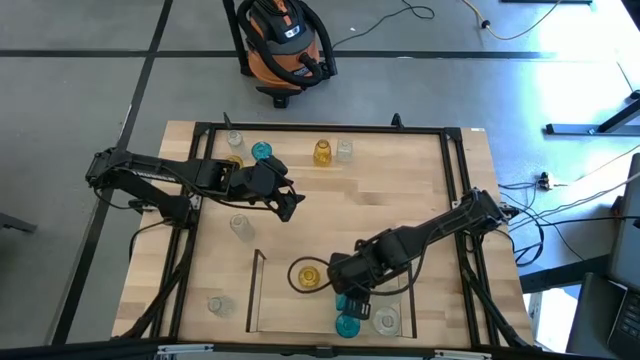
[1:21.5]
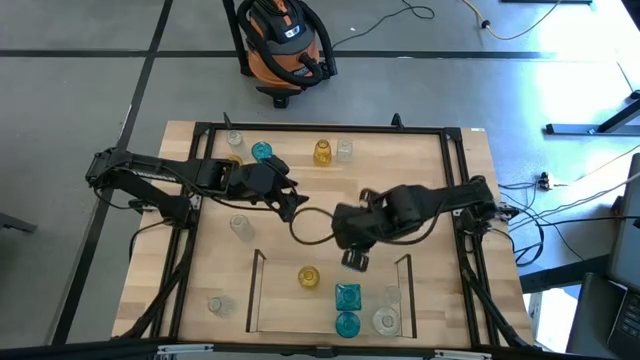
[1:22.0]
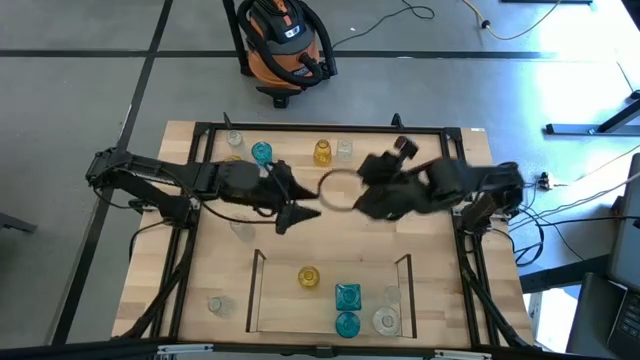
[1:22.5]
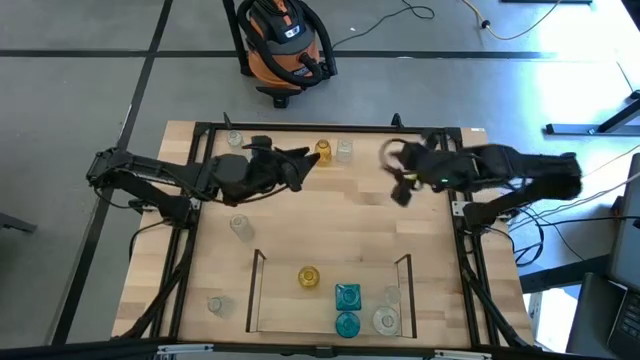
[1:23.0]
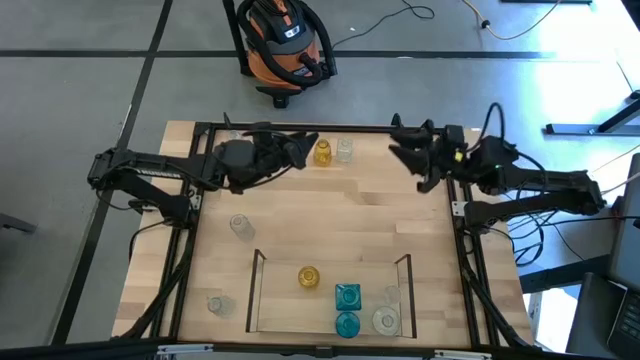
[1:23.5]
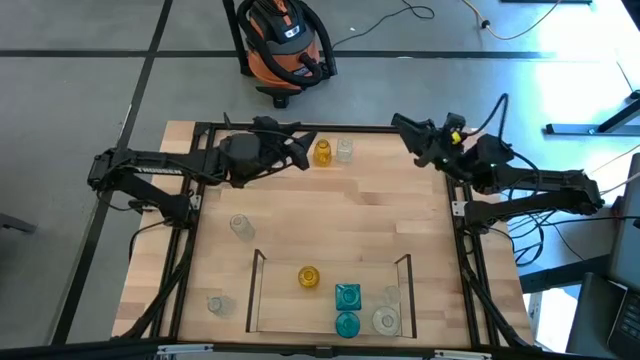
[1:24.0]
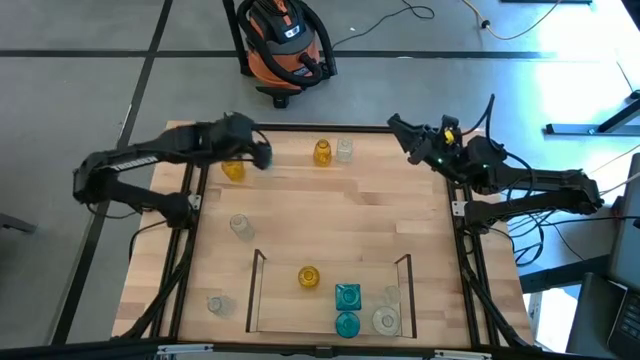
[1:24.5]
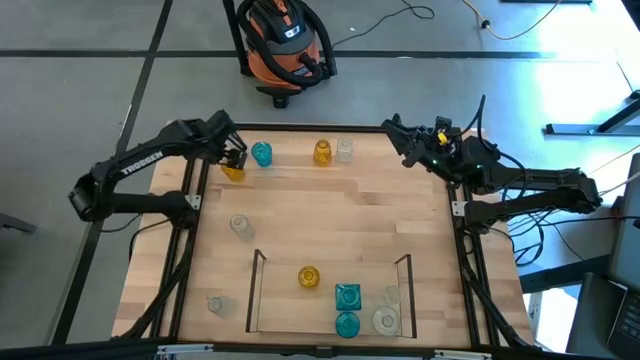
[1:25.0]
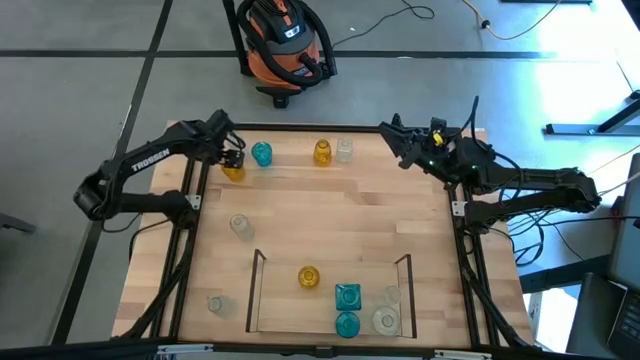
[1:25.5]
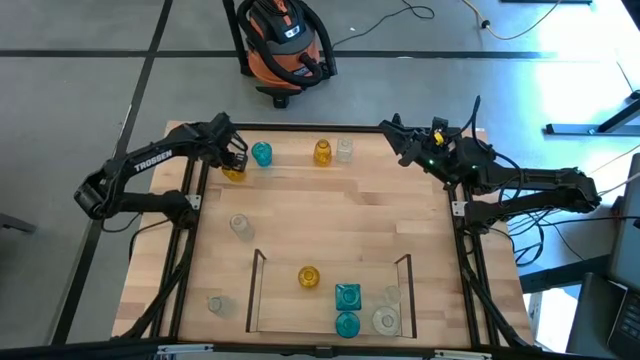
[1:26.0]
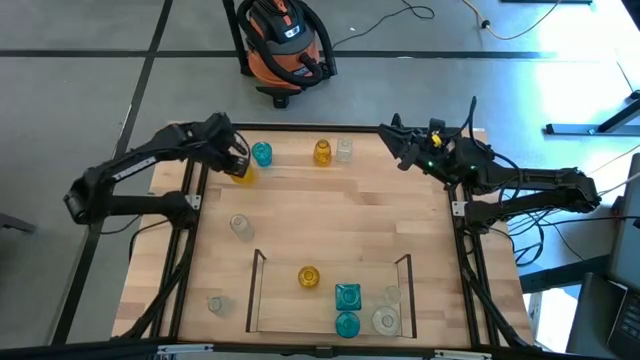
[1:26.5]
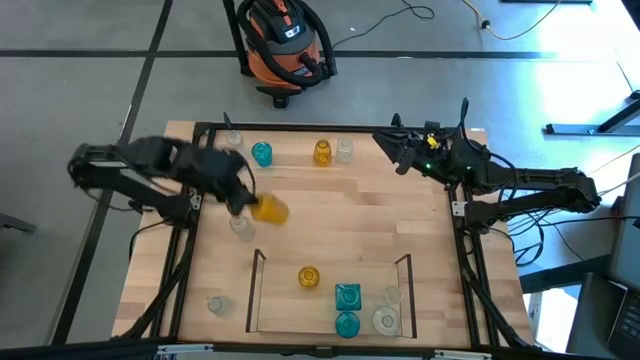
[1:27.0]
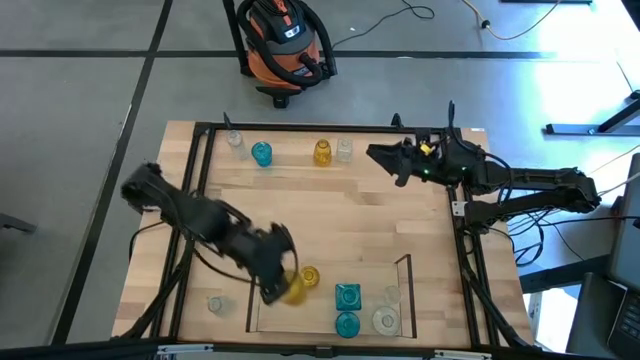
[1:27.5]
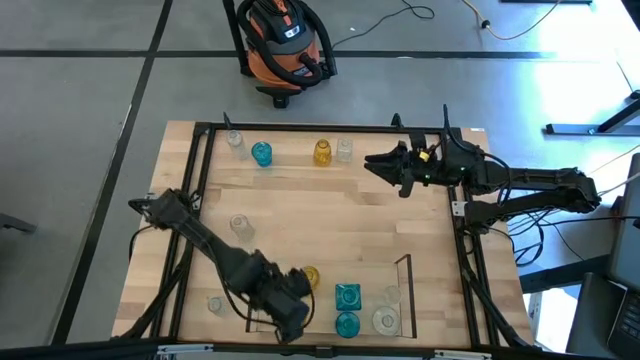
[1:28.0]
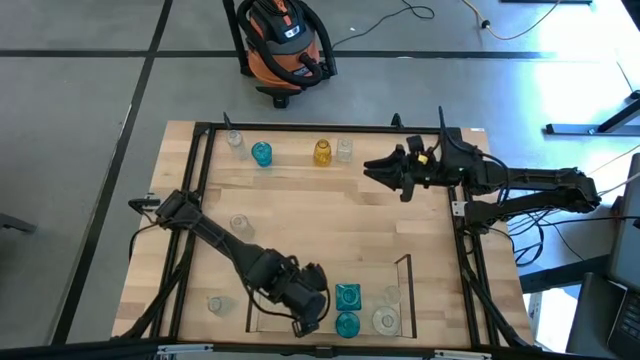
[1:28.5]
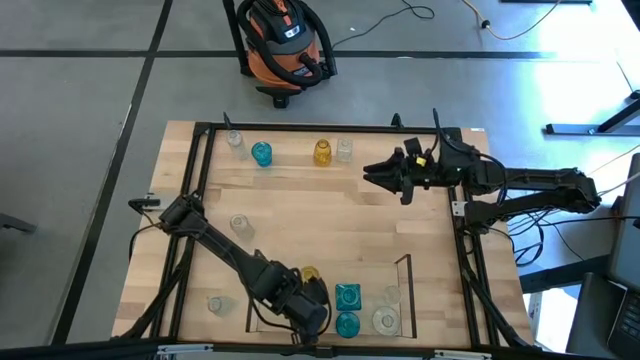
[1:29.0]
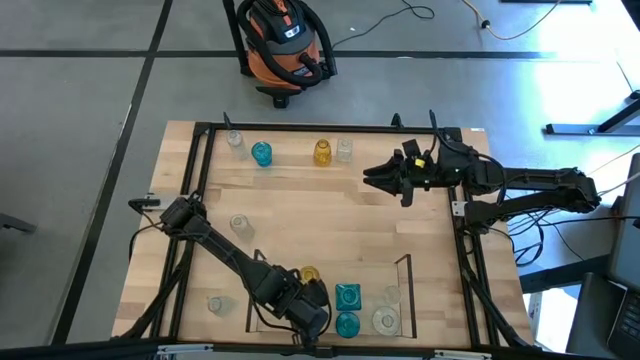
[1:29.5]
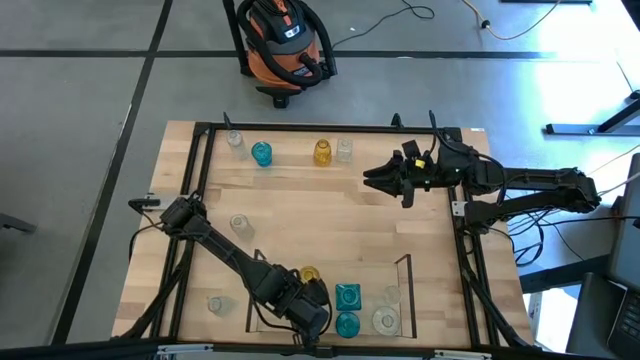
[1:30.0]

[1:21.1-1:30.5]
Task: sort vases onto shelf
Put the yellow vase on the shelf aligned with the other yellow vase

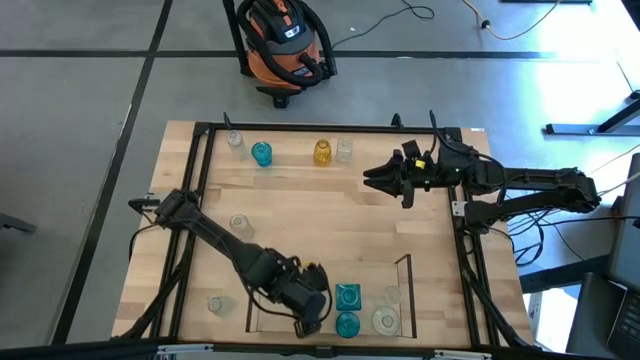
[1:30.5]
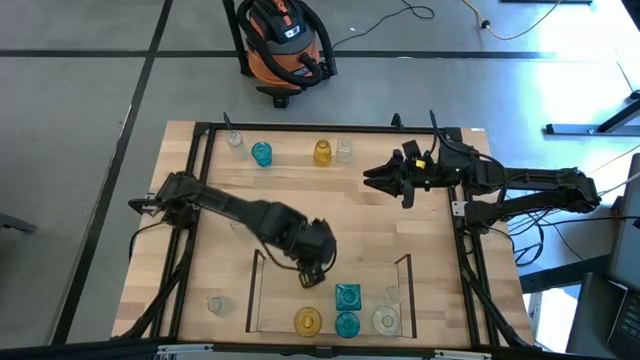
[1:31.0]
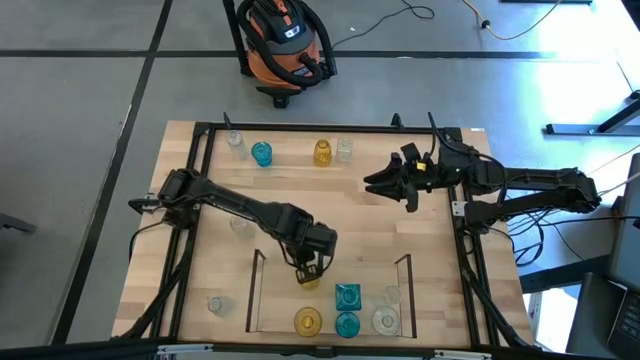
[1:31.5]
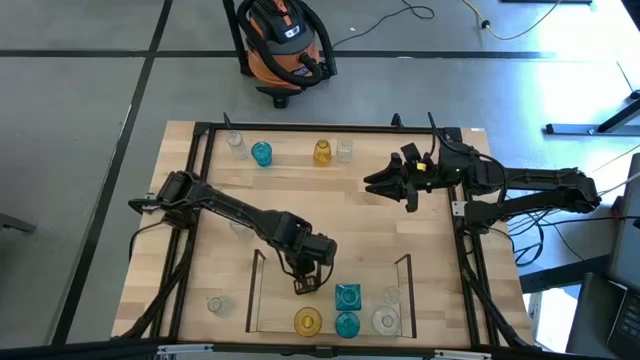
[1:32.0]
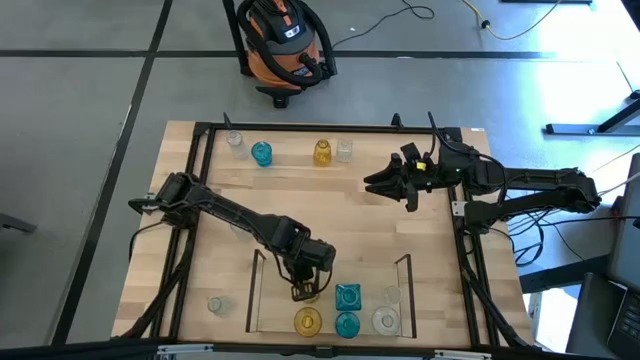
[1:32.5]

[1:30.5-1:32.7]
Adjust the yellow vase on the shelf aligned with the other yellow vase

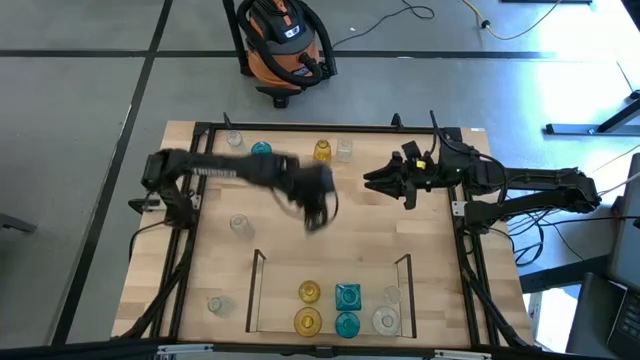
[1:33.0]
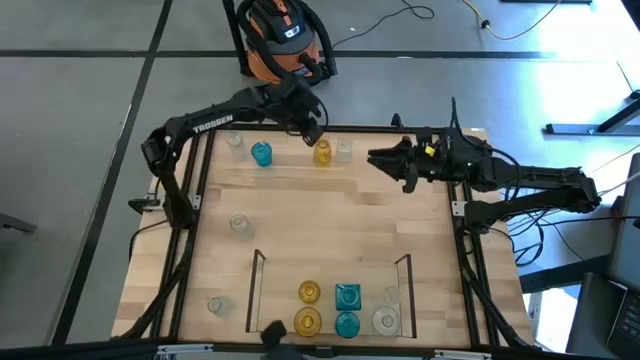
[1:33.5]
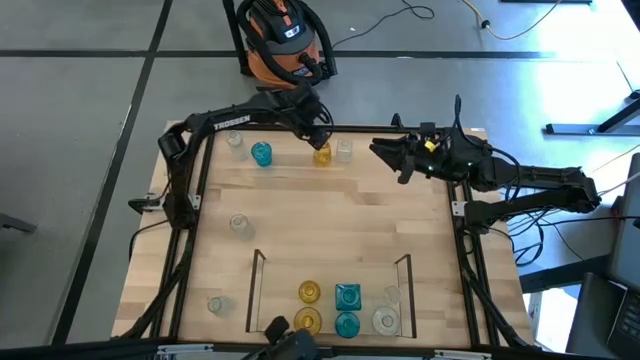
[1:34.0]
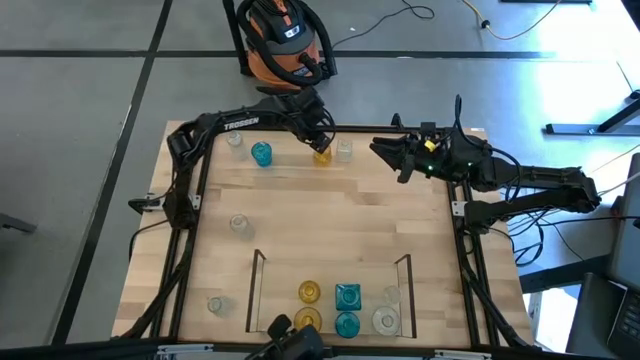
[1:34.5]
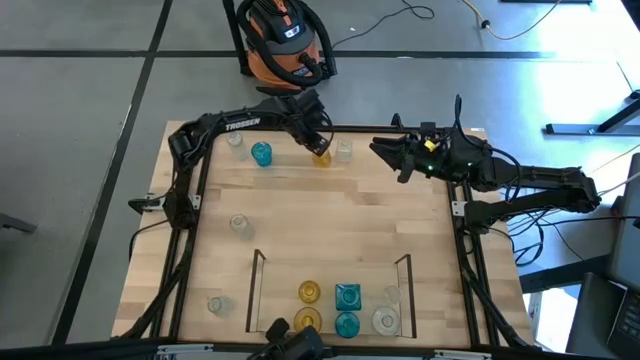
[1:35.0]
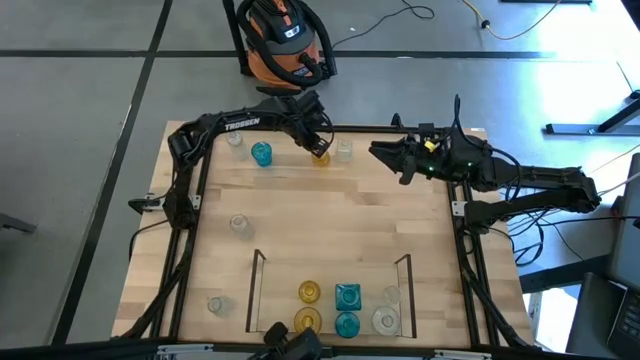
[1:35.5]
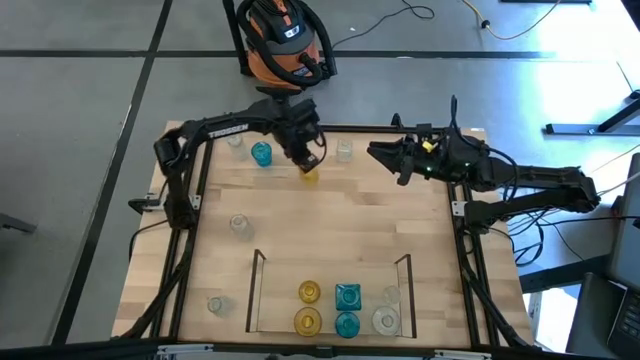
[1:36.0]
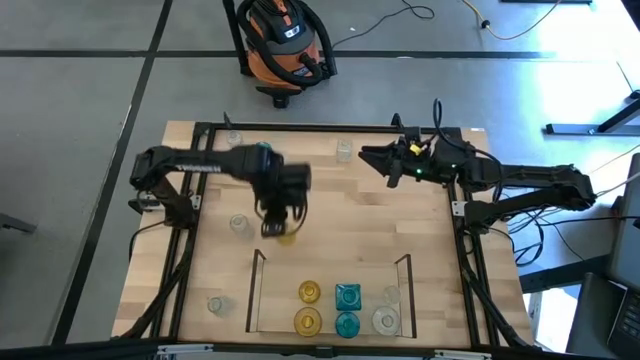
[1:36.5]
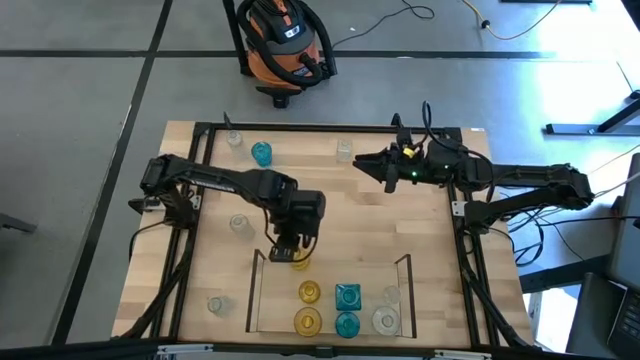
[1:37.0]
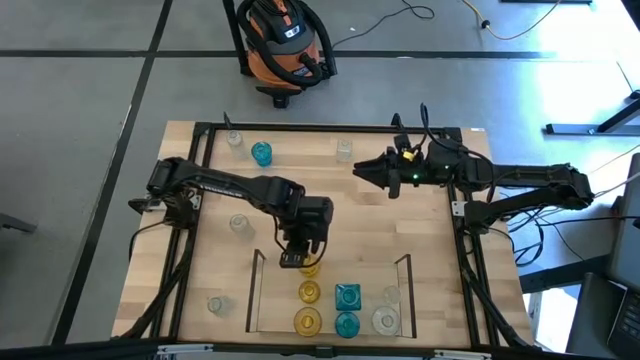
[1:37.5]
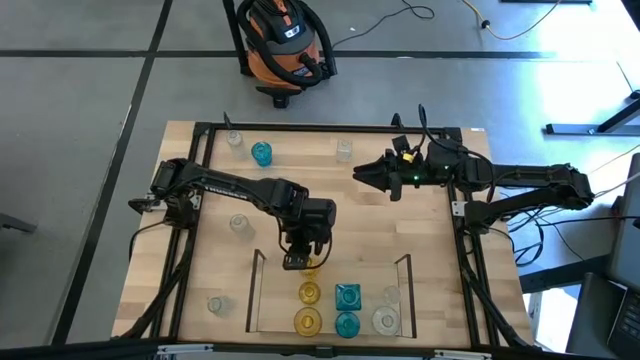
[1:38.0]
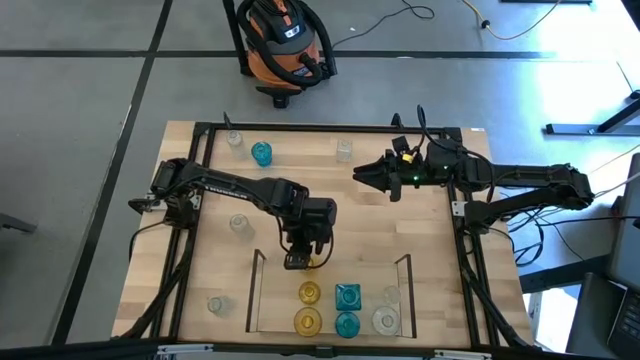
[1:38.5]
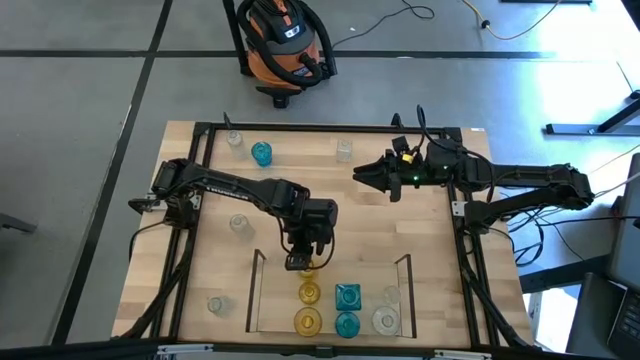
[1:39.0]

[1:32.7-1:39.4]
Put the yellow vase on the shelf aligned with the other yellow vase

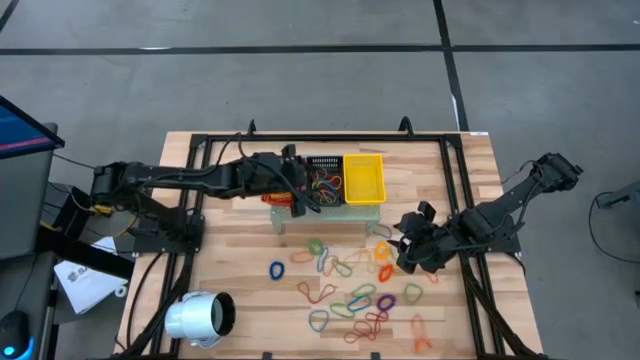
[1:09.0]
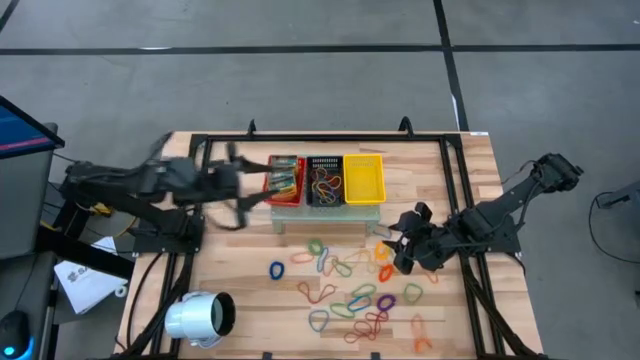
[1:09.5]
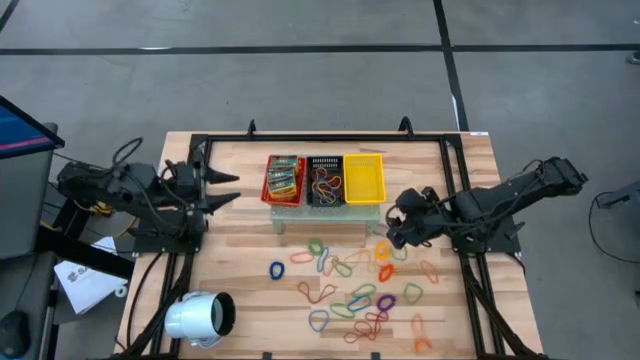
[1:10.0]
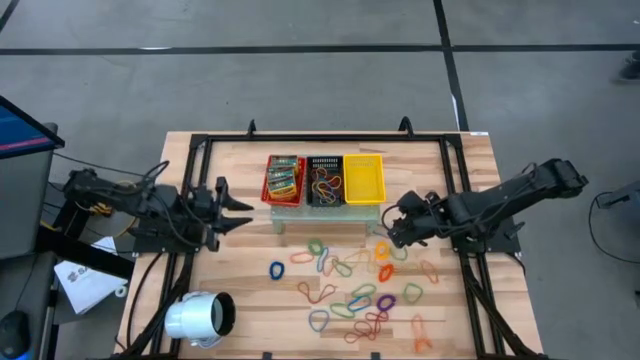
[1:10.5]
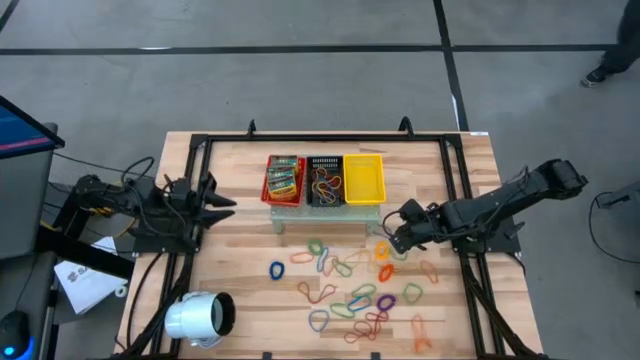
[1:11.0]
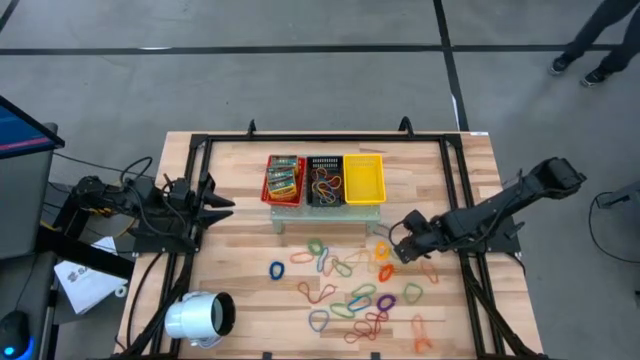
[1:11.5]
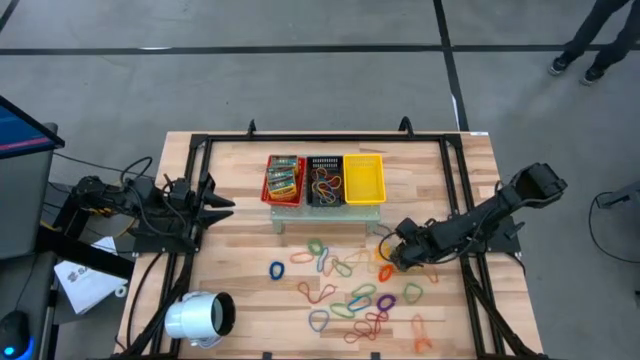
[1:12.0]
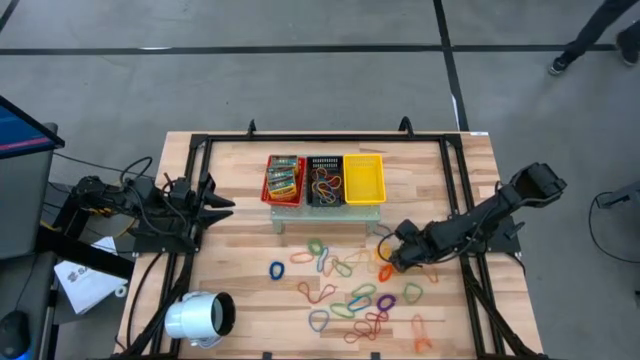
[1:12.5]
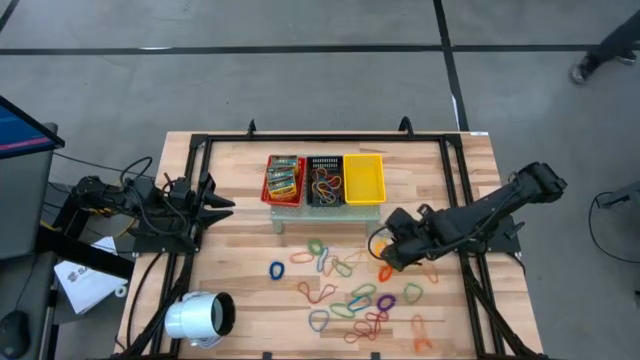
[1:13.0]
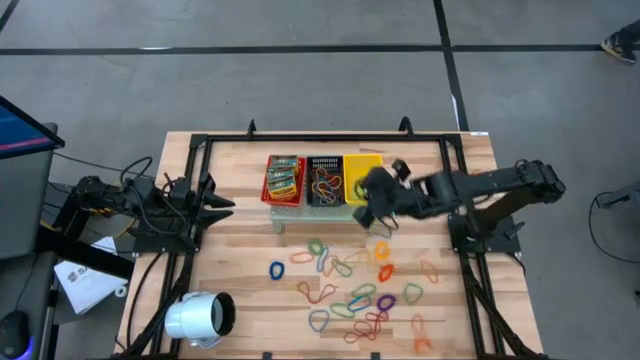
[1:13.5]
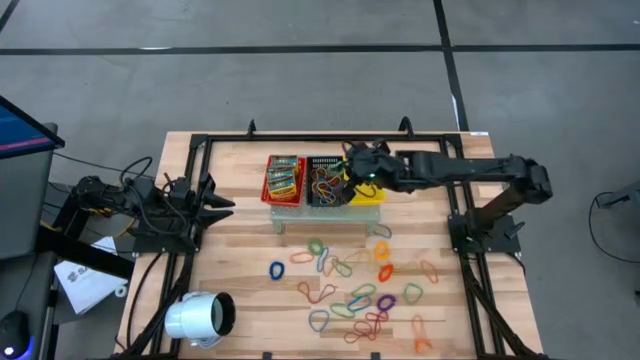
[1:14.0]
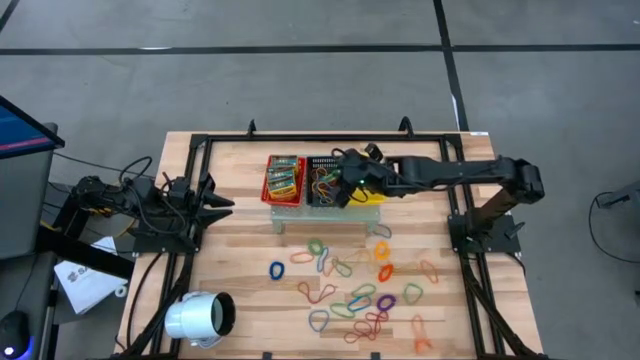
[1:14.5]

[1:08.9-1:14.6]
Task: Pick & Place Office Desk Supplies
Put the green rubber band into the black bin on the shelf
